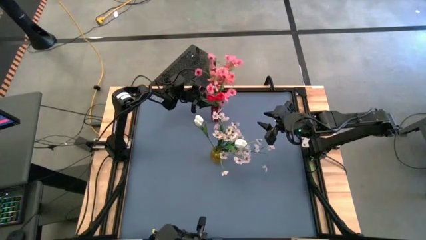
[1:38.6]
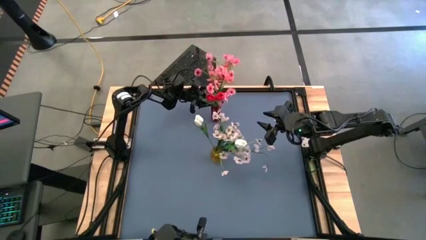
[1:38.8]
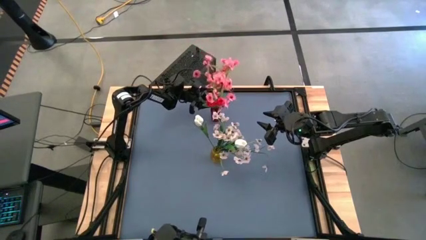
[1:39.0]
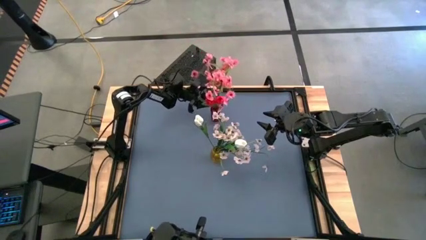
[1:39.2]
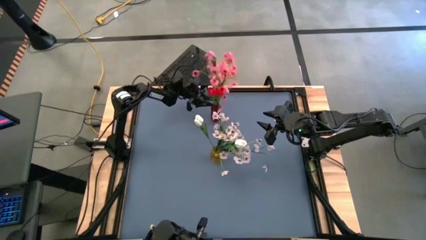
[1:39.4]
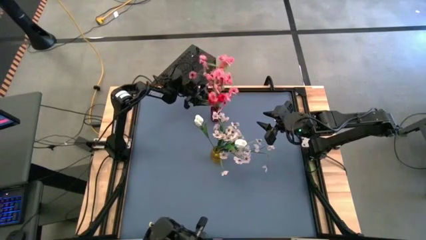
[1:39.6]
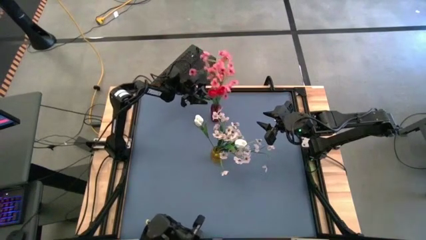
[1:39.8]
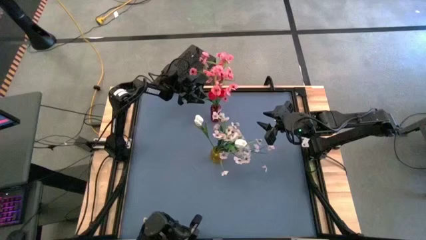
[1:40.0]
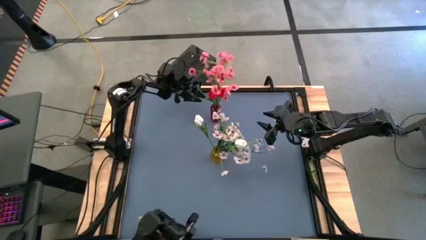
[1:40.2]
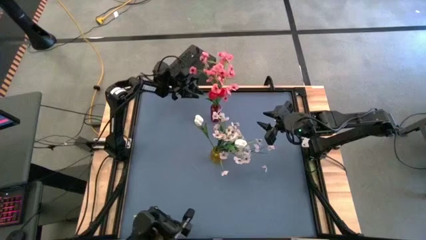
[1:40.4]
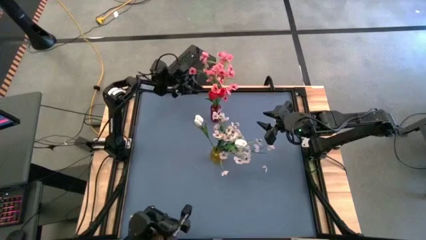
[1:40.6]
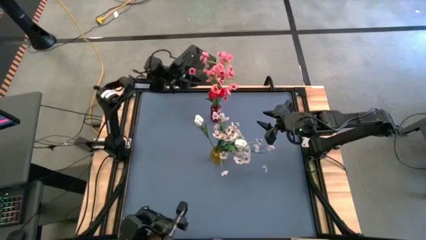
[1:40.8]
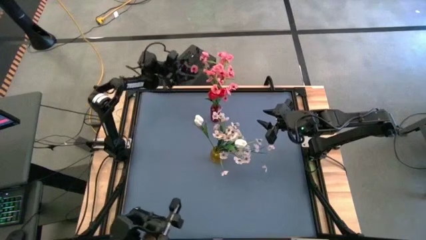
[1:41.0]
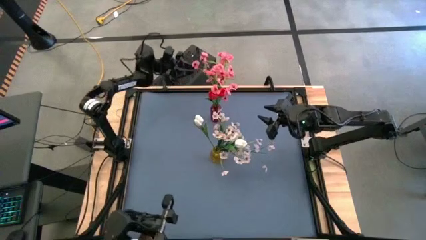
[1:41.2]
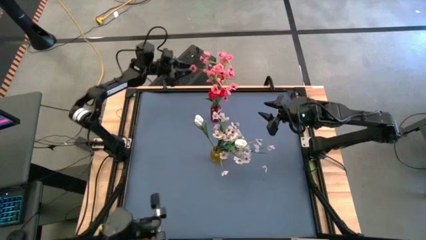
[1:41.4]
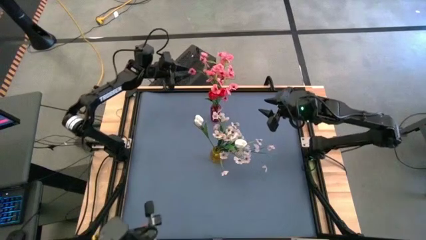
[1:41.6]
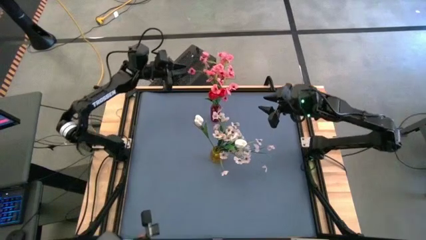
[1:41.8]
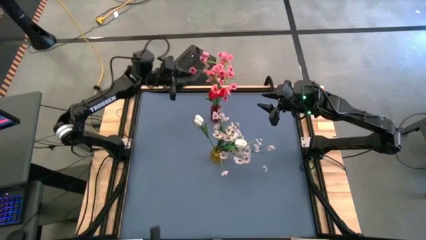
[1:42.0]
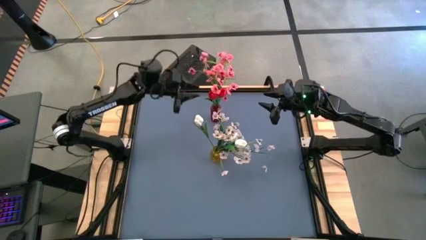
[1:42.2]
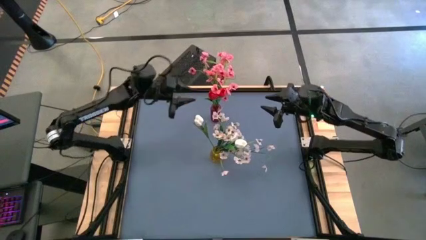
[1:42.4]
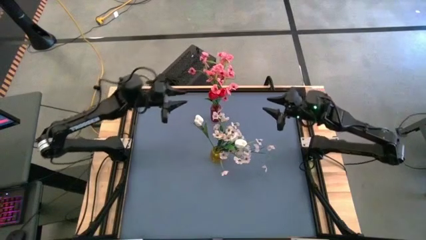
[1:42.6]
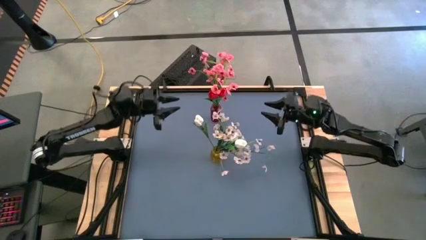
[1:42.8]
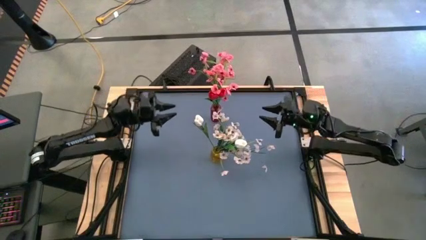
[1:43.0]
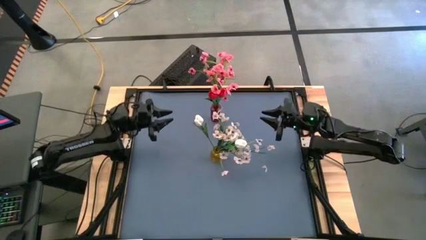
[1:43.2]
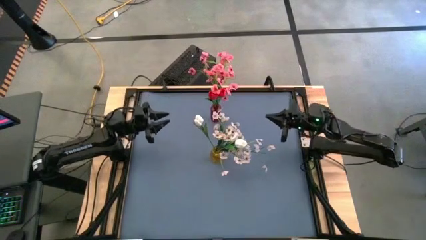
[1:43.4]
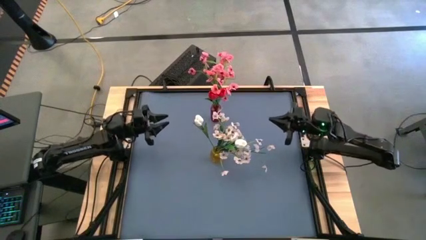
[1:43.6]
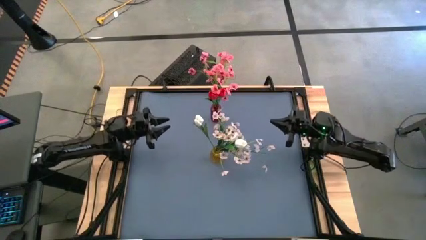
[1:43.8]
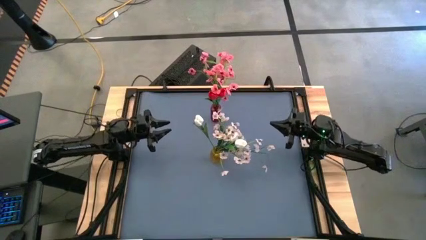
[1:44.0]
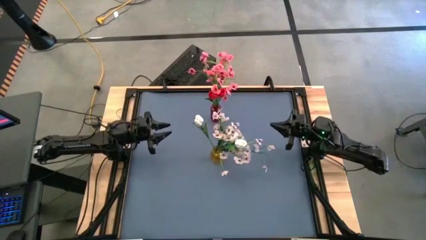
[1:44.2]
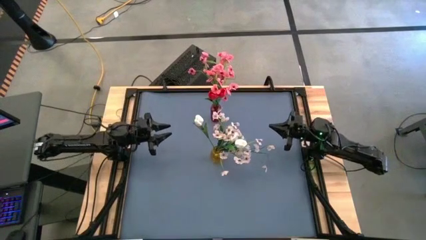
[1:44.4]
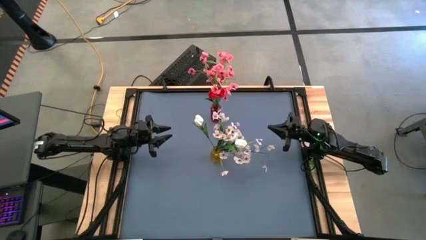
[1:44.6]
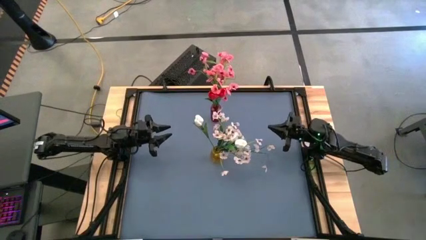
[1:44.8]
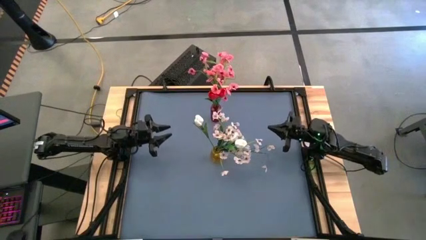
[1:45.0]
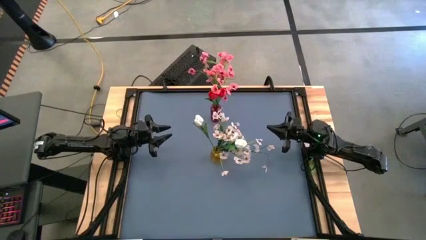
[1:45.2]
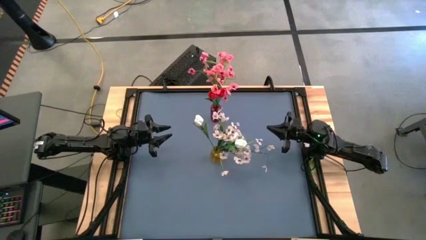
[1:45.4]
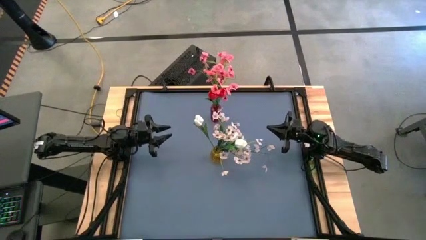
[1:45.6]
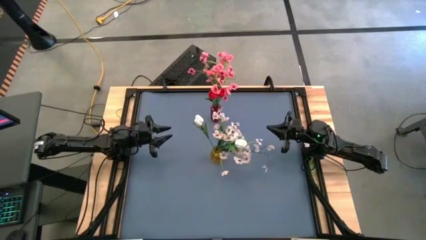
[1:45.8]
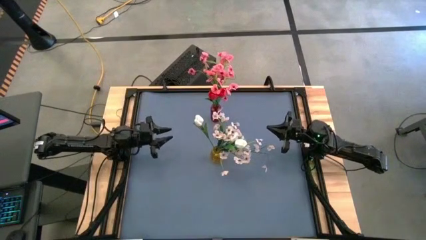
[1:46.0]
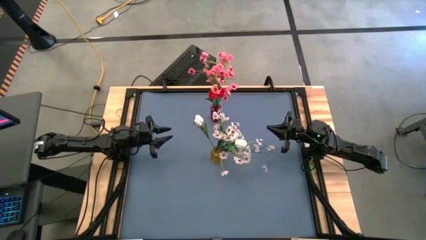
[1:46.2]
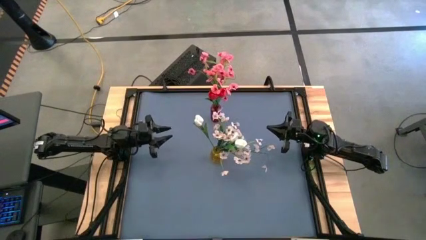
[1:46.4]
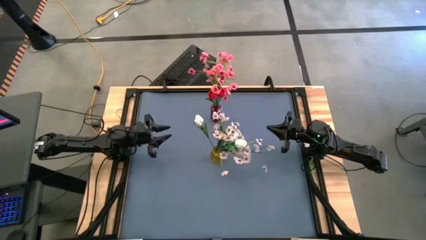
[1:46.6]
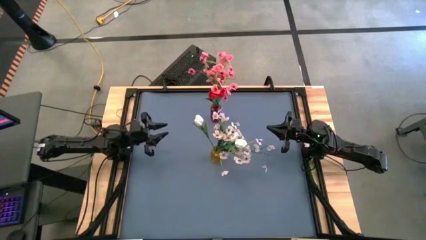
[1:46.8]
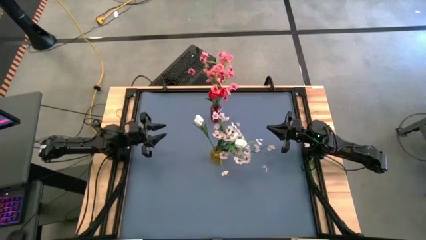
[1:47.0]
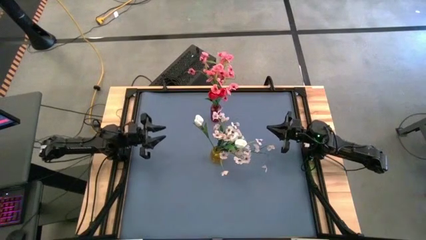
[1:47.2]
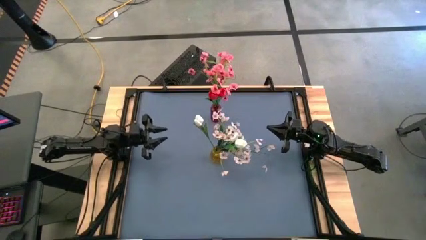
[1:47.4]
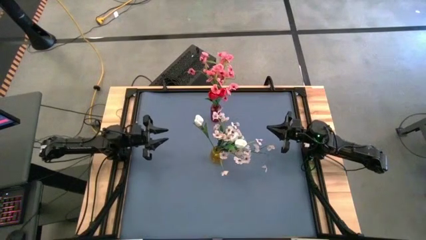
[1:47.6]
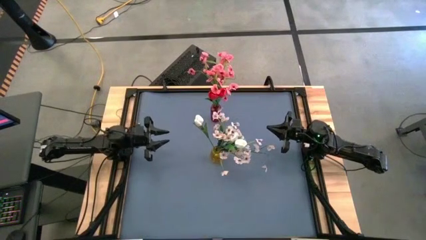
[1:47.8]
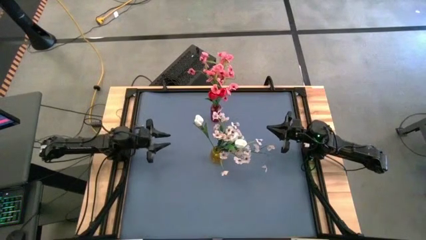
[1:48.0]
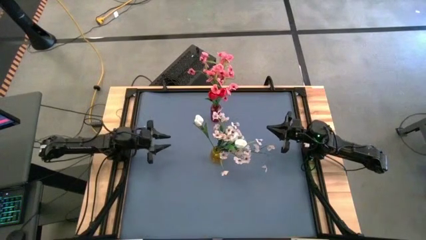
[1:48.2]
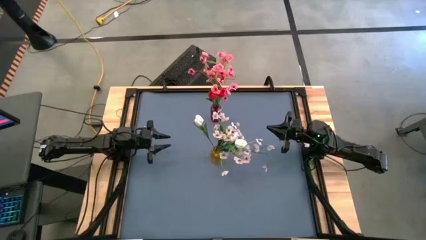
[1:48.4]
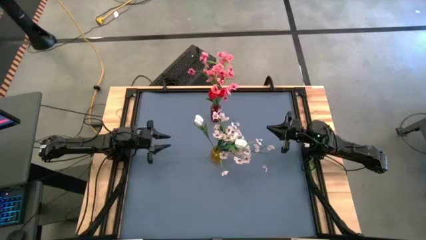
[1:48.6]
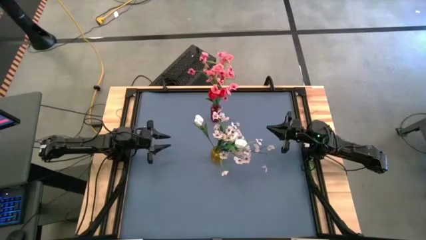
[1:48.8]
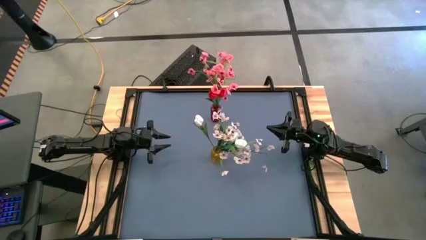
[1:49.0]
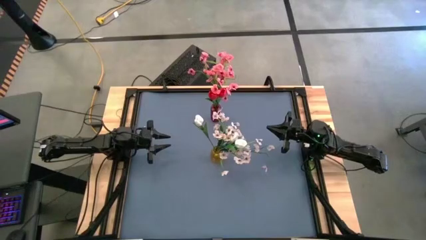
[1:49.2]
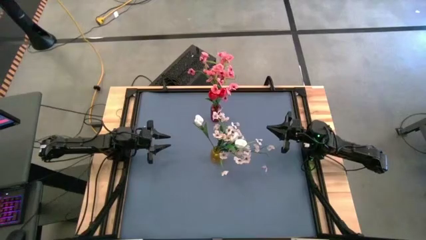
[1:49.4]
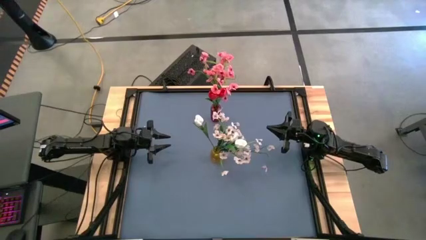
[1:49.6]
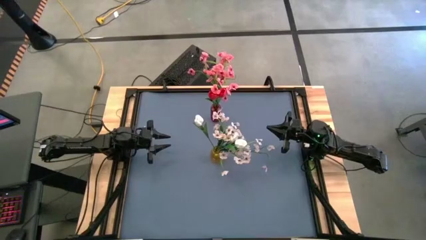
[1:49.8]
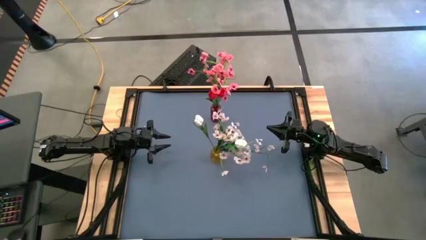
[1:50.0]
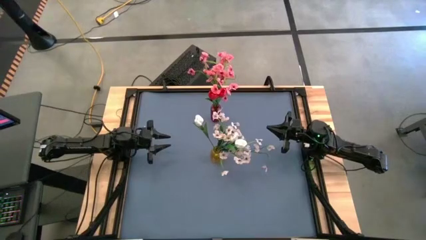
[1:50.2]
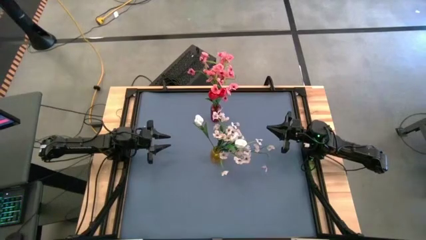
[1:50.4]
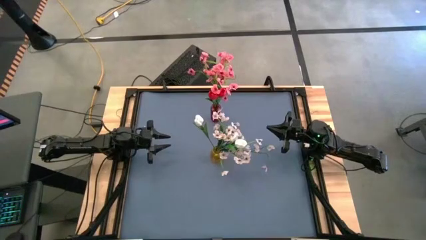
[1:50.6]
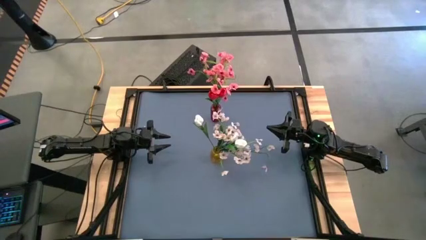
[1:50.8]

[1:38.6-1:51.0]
Task: Sort flowers into vase by color
Return to Home Position

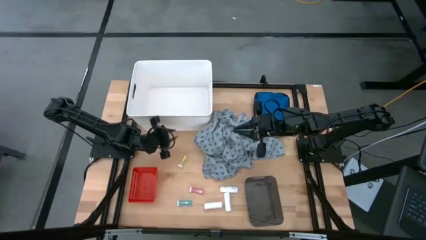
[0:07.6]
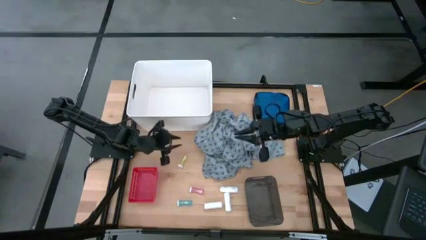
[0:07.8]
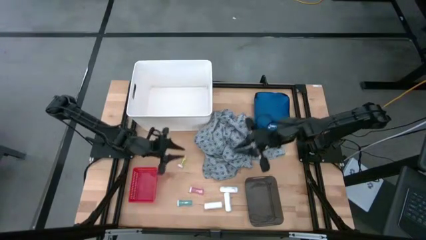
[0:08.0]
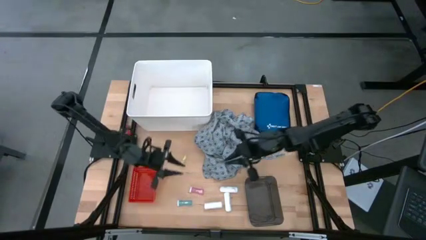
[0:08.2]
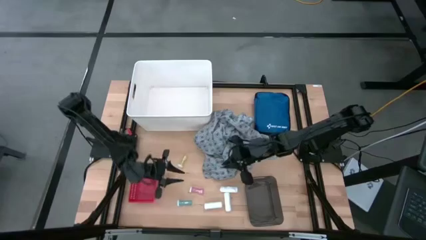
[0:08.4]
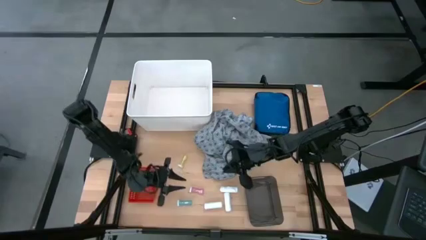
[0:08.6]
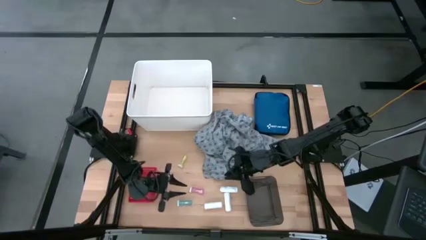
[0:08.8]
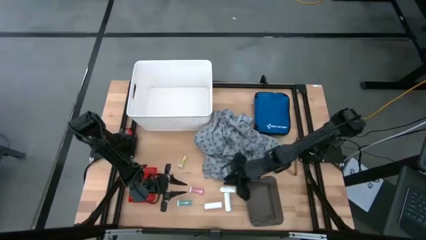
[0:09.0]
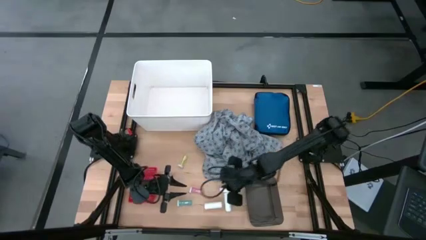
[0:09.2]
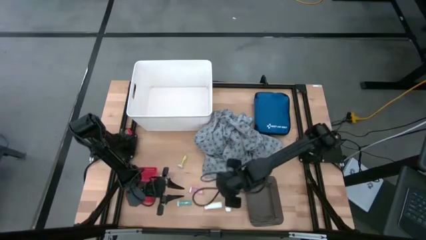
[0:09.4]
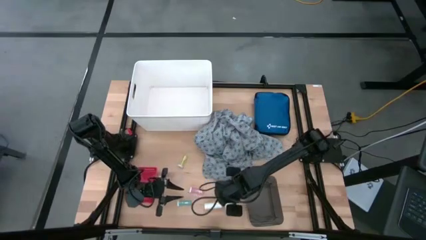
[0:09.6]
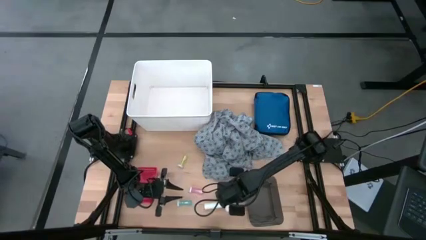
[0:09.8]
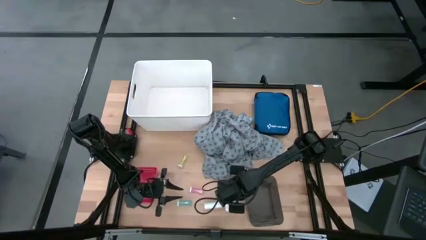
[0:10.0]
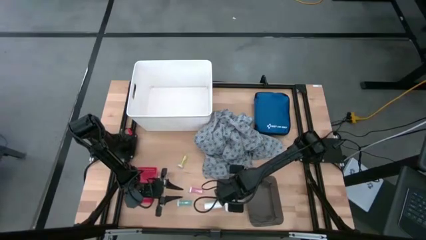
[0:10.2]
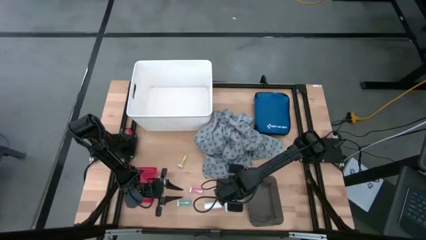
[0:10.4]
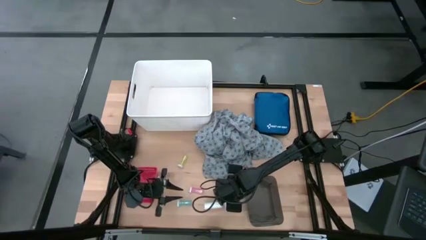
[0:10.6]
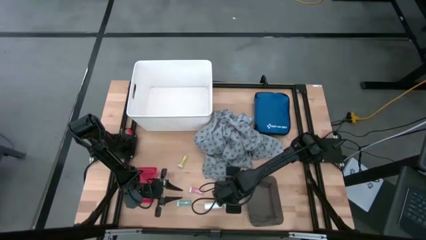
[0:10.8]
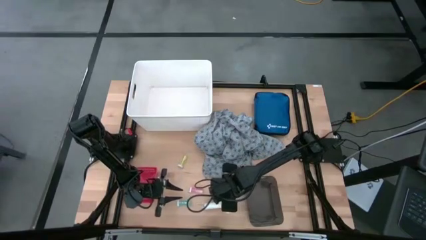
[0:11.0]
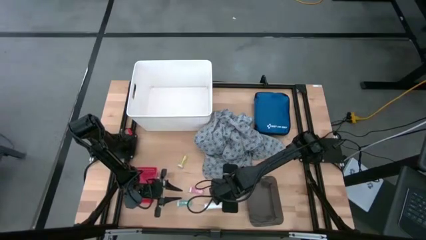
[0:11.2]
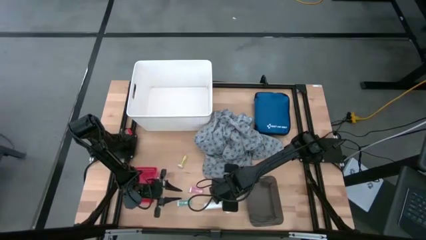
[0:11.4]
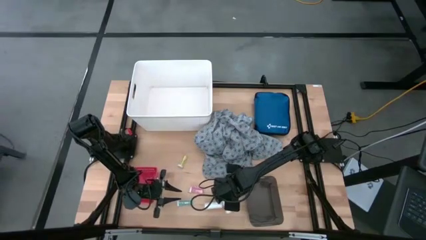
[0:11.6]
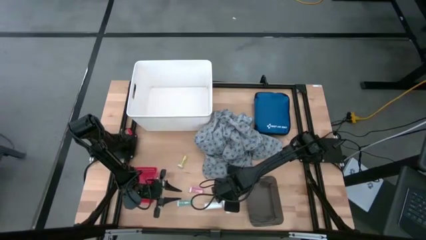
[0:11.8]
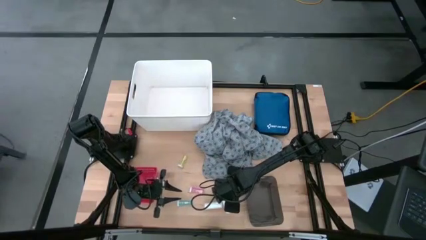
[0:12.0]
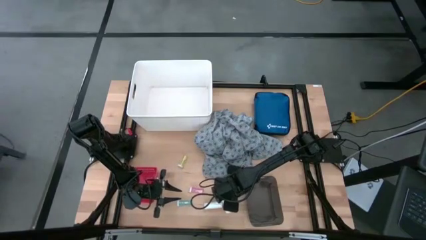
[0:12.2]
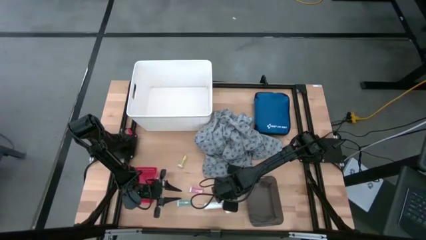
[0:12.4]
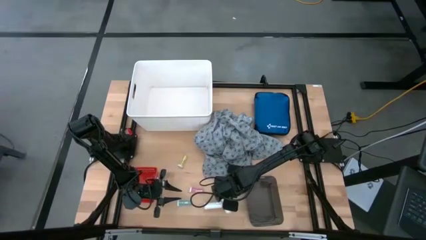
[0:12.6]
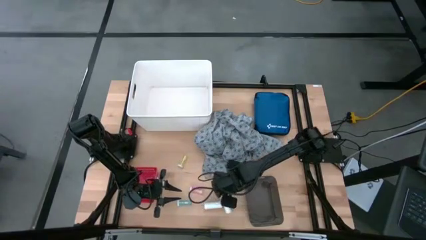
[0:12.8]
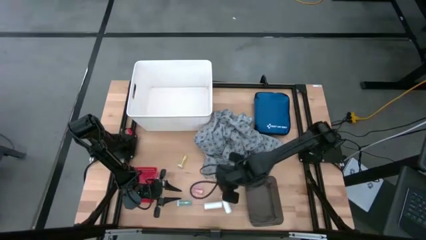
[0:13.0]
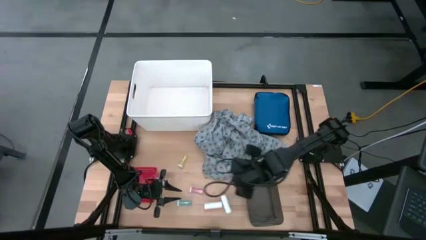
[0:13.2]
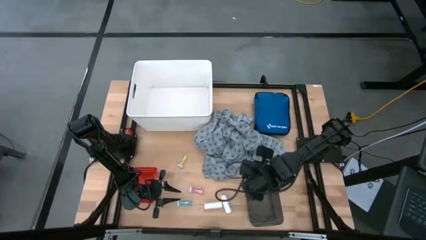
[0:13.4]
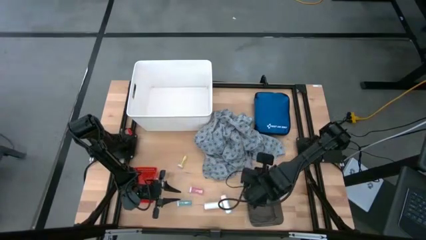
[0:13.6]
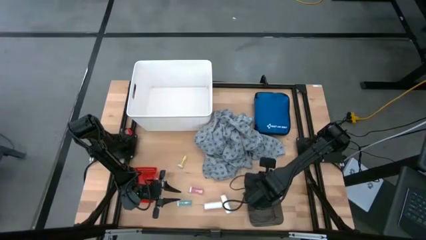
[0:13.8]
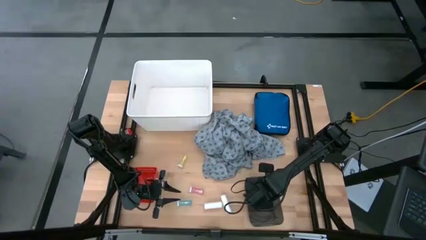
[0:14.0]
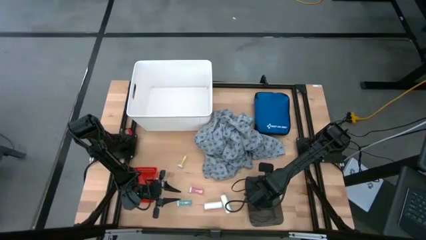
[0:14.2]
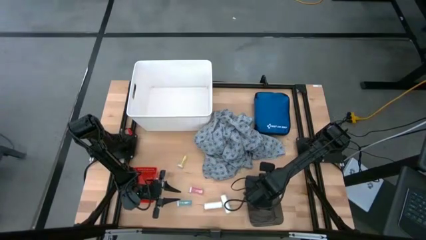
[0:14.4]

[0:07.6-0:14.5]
Task: Pick & Place Medicine items
Put the top white rolled gauze into the black bin
